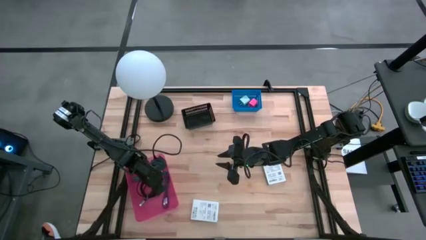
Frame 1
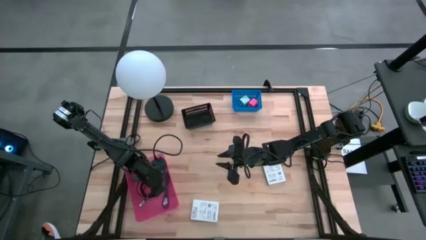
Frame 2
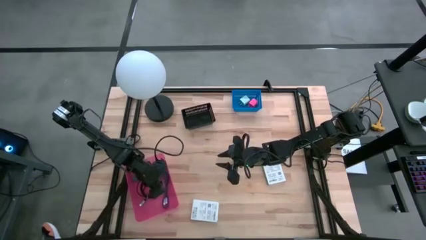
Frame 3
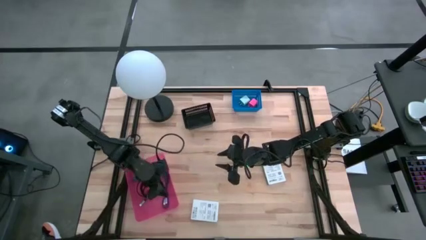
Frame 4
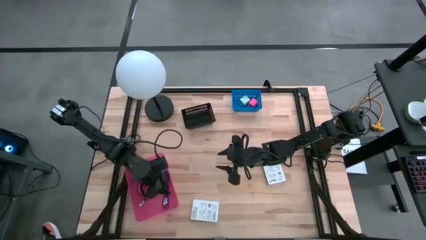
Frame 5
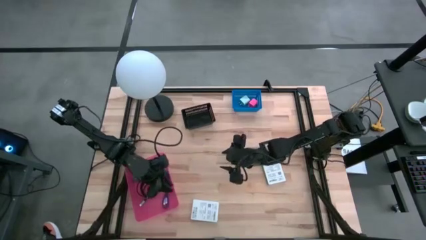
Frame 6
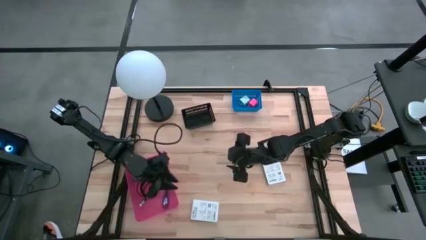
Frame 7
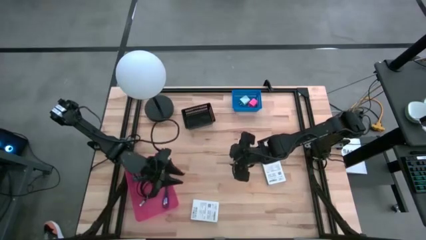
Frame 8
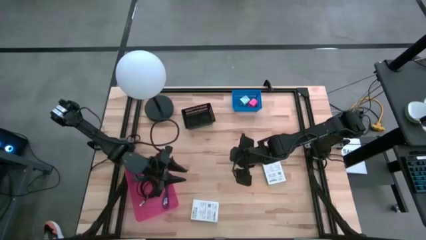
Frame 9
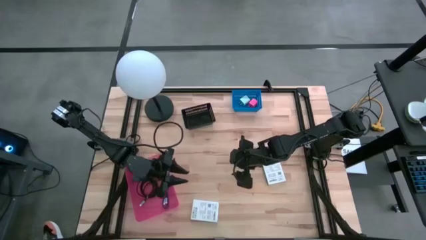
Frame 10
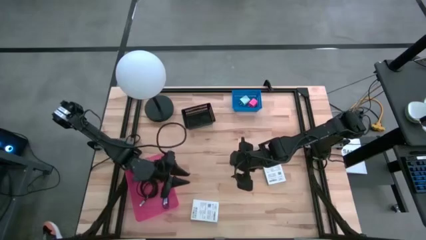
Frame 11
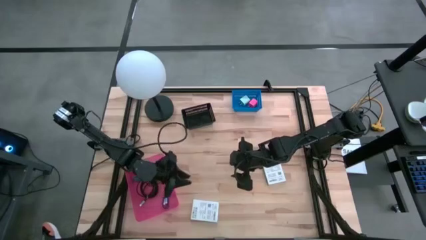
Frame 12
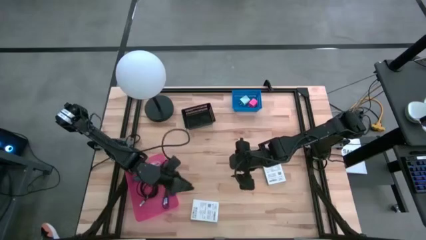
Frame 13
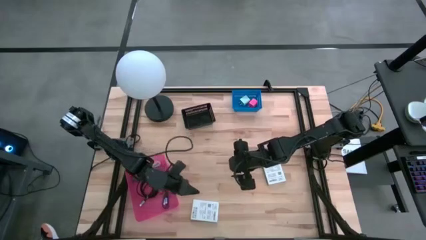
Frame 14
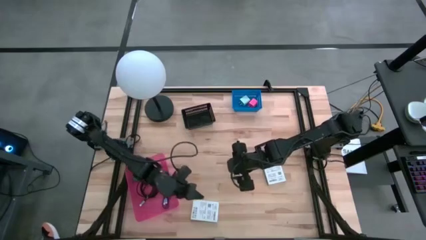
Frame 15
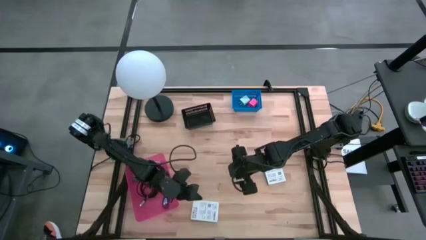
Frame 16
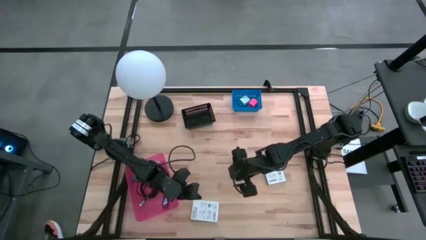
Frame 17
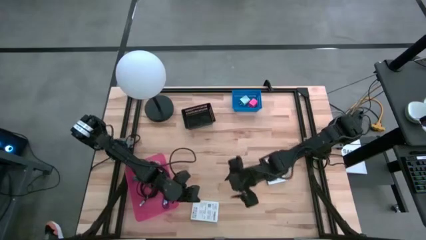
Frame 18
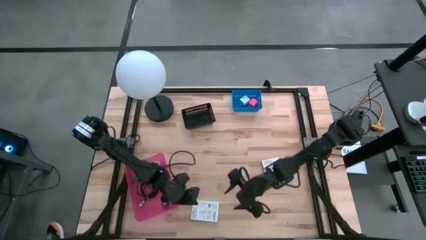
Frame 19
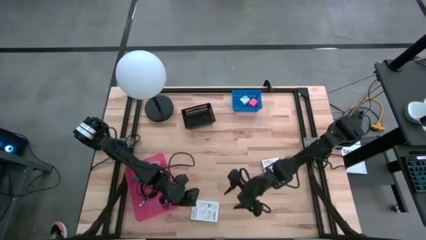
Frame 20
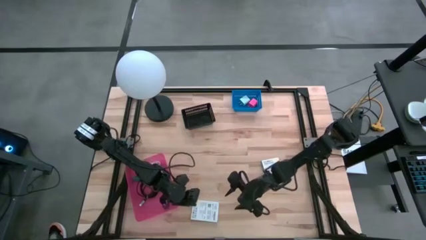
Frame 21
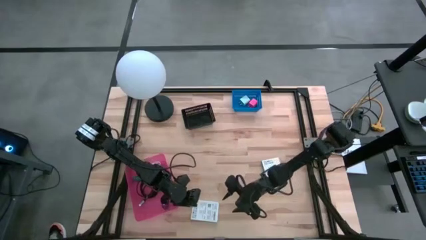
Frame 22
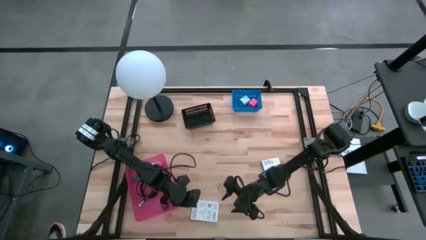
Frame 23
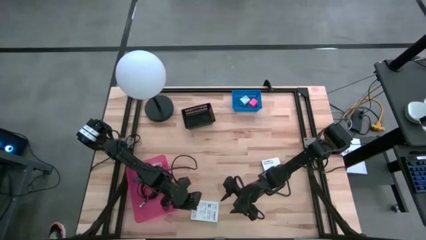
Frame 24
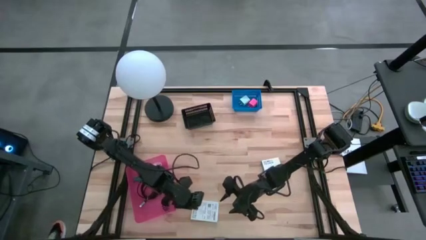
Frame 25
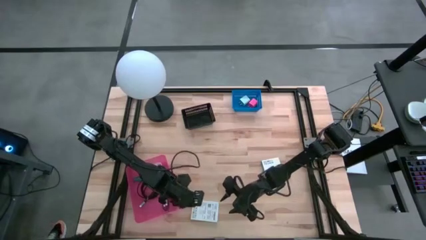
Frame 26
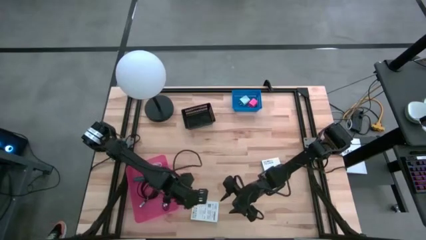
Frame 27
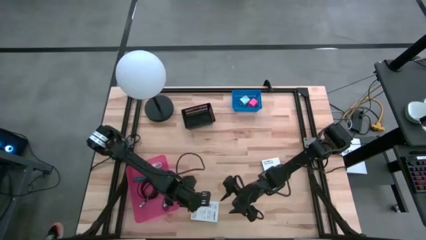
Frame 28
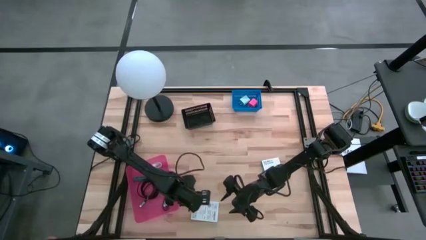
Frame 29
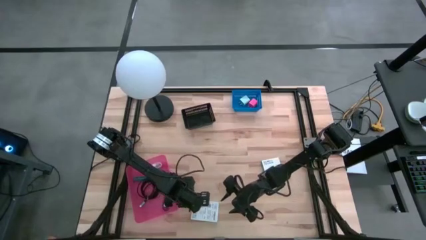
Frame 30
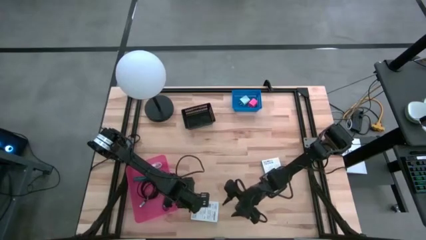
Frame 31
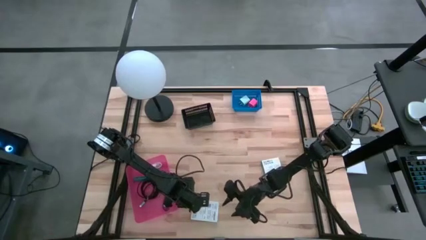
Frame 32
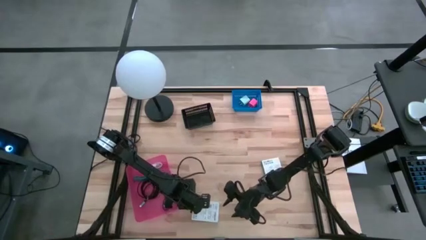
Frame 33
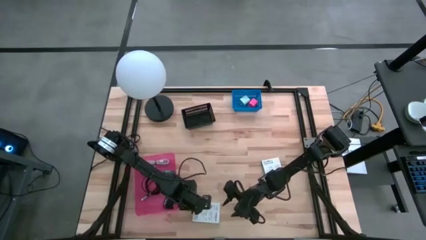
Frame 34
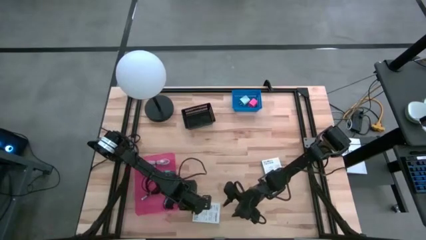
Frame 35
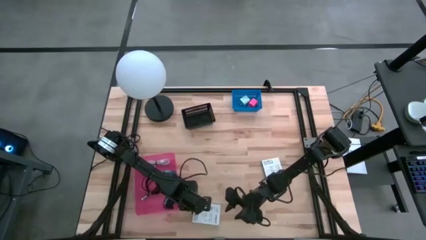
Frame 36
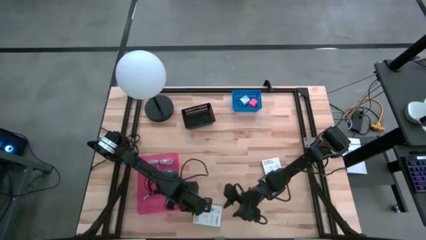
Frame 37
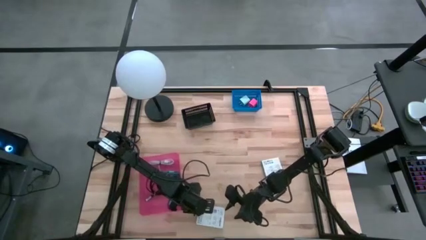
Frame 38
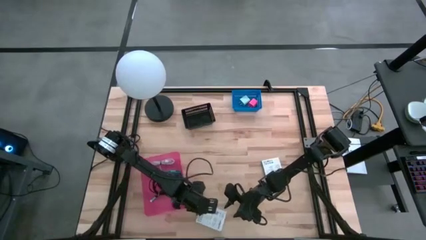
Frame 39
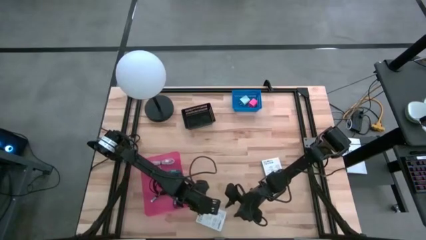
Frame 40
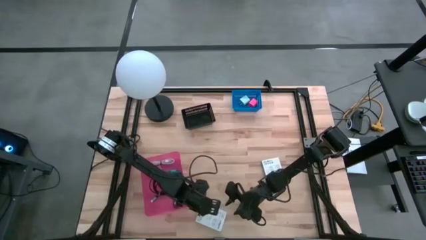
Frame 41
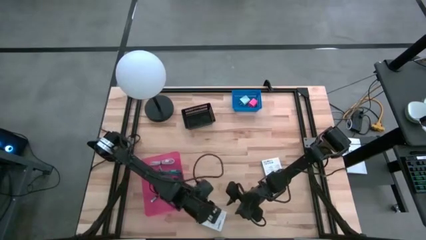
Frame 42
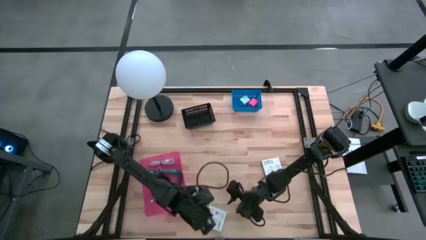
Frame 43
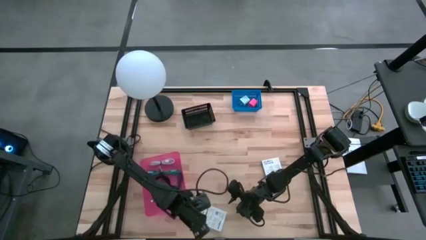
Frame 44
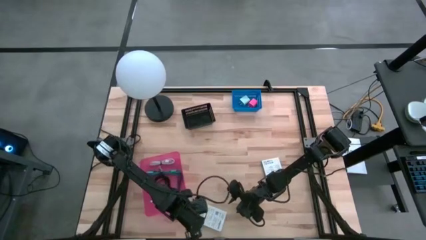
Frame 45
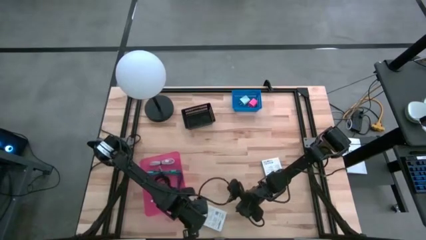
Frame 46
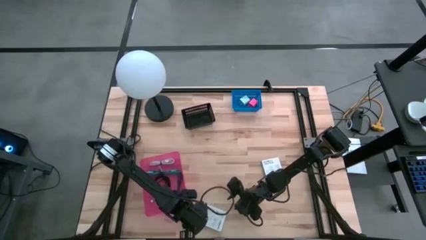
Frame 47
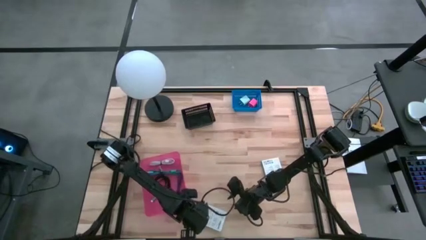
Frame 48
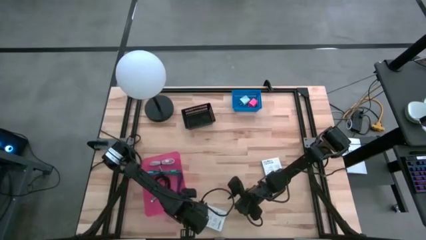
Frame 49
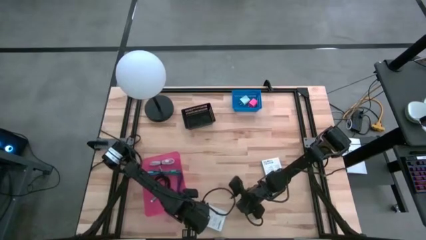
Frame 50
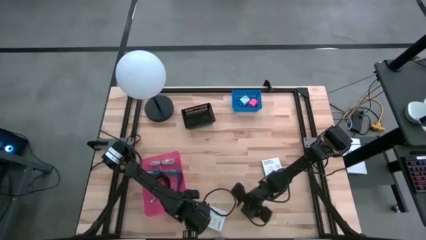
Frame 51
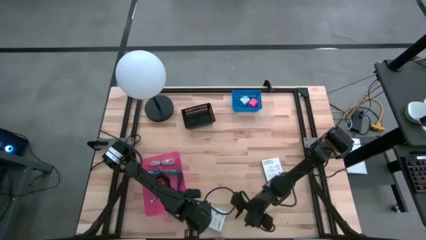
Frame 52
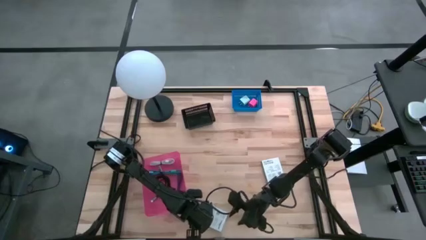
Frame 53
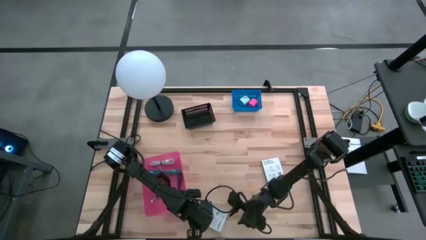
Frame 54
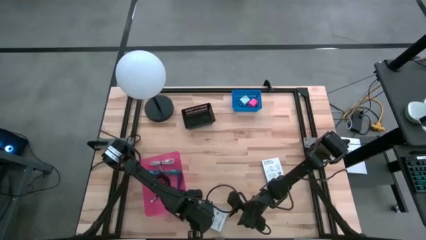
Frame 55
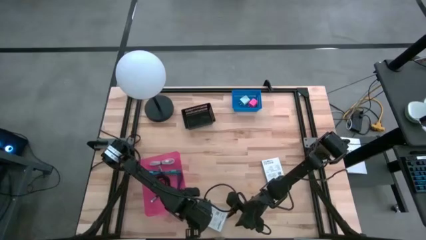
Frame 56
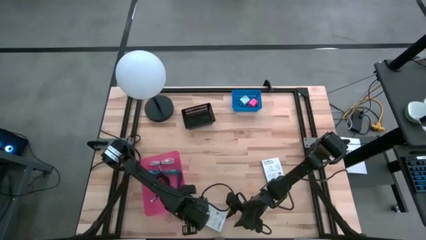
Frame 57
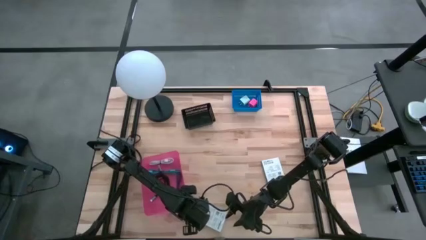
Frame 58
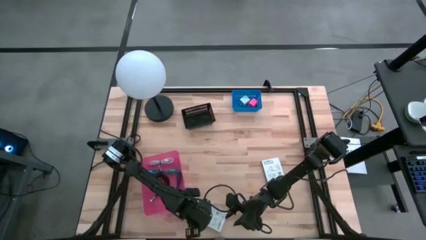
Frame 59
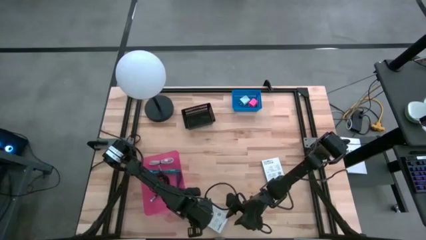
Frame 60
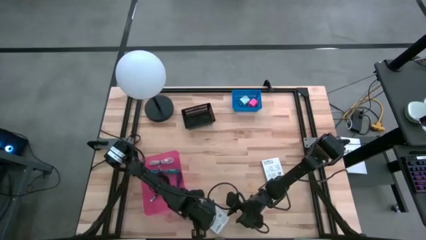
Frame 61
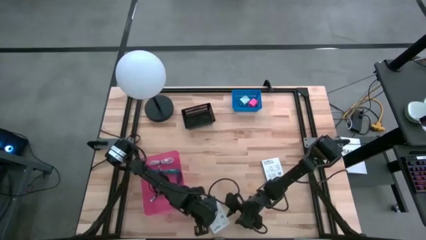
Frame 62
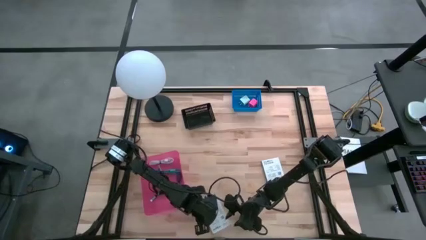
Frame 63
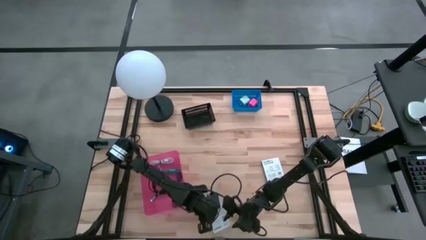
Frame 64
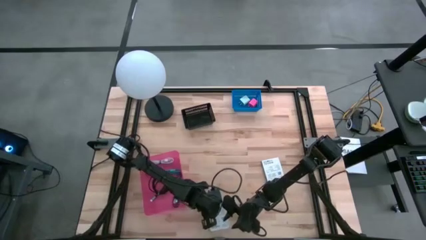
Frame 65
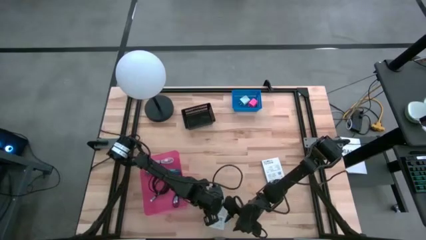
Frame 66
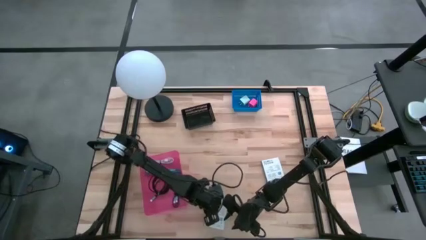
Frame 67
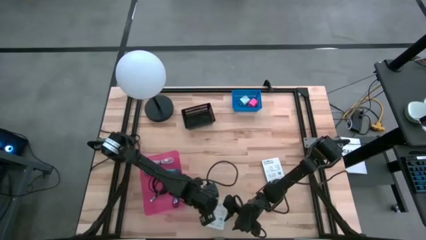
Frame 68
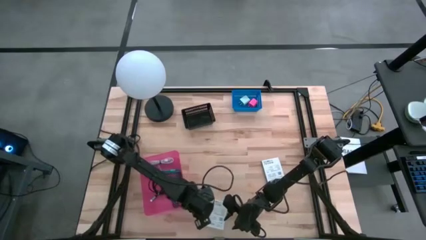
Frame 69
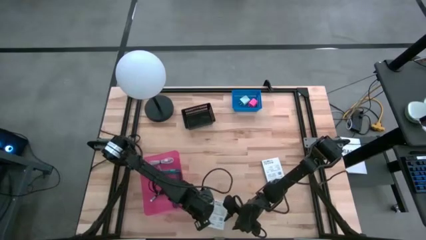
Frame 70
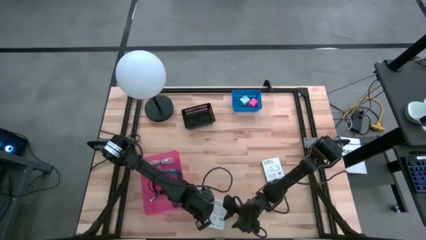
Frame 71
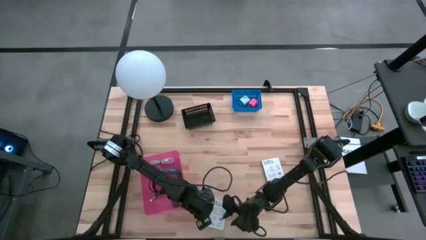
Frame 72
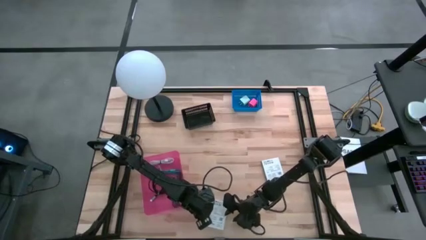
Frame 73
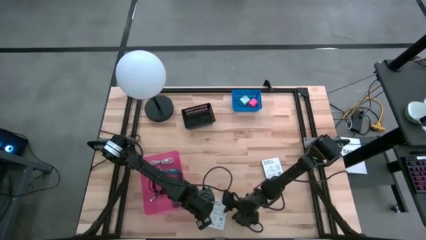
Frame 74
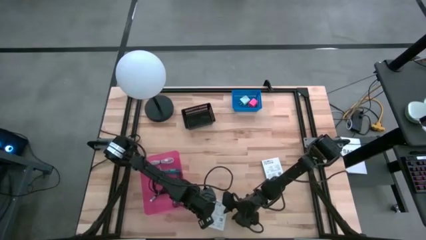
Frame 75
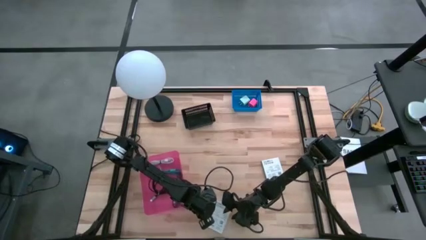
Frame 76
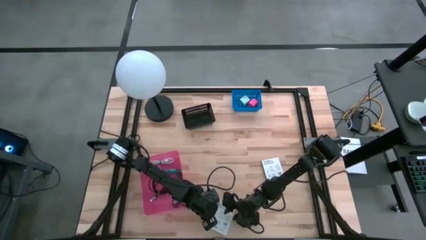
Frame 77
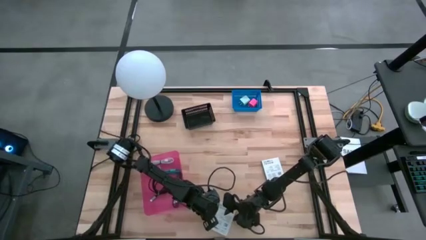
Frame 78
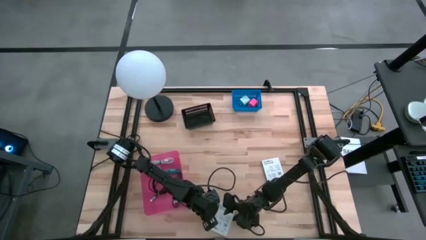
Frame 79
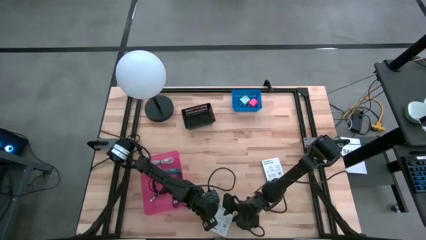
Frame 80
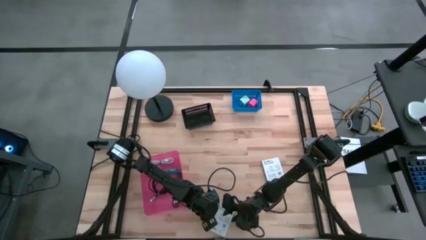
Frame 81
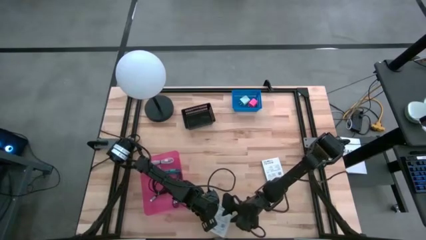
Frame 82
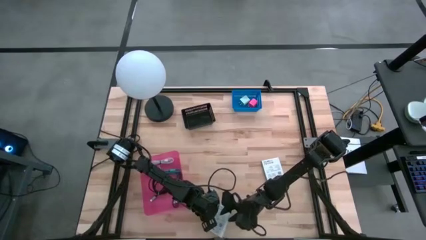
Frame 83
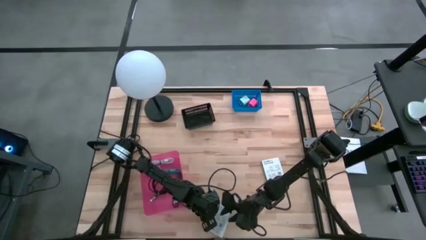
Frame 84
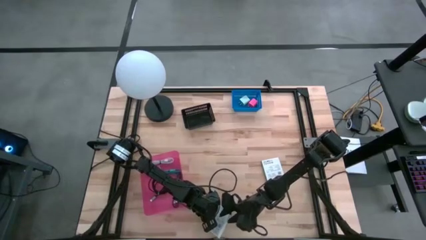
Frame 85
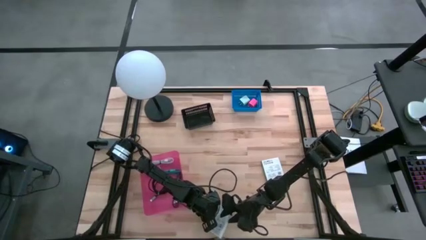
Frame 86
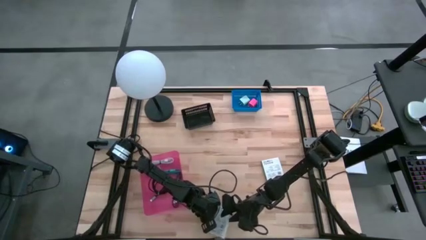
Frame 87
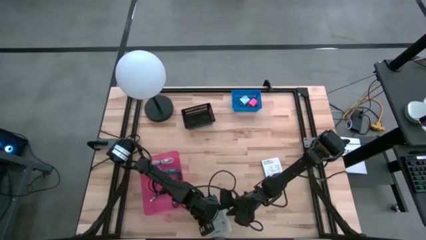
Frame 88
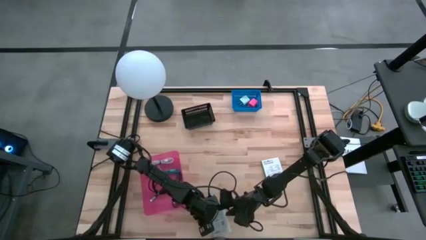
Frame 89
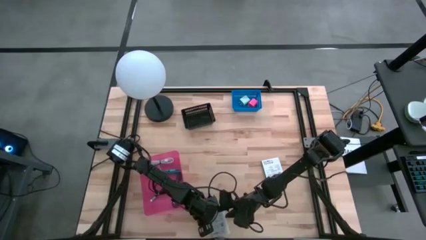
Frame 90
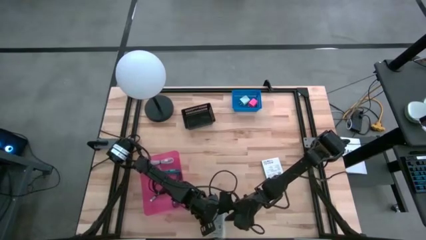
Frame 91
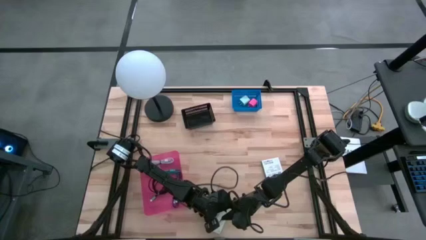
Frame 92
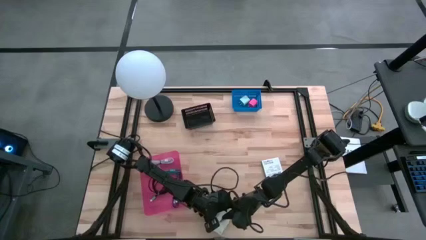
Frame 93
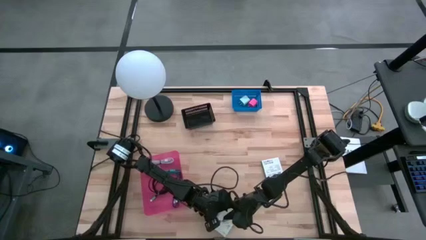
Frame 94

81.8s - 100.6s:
Task: Pick and place items into bin
Put the bottom card reader box into the black bin
